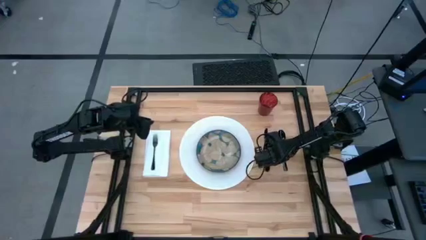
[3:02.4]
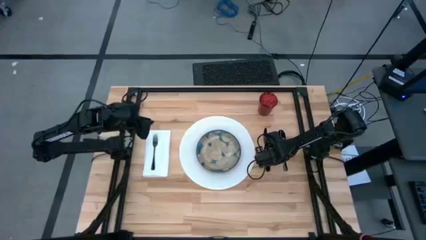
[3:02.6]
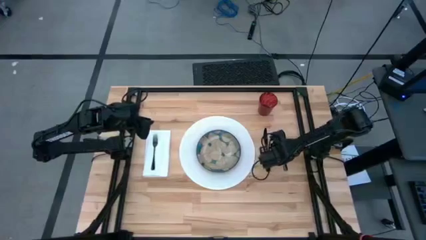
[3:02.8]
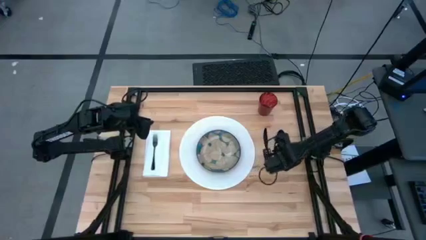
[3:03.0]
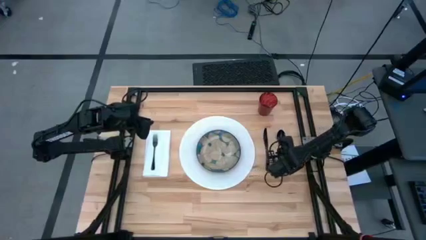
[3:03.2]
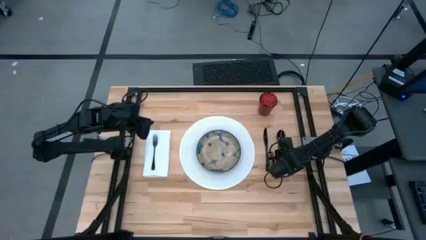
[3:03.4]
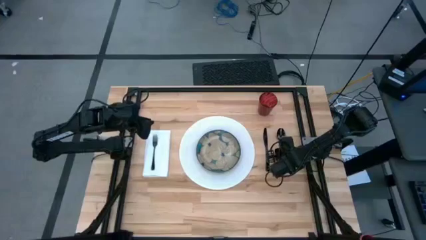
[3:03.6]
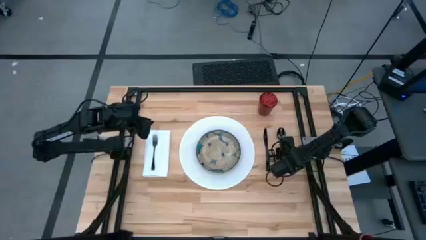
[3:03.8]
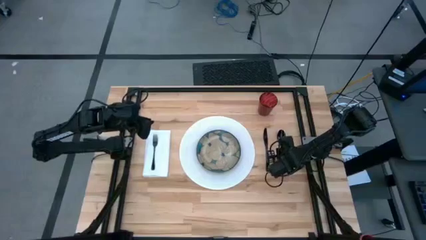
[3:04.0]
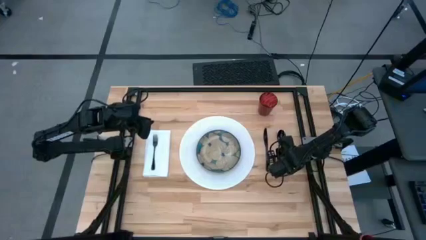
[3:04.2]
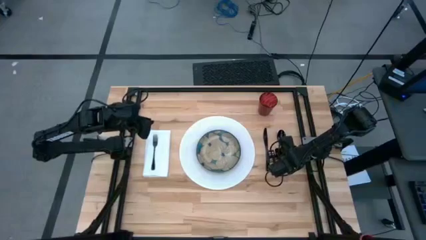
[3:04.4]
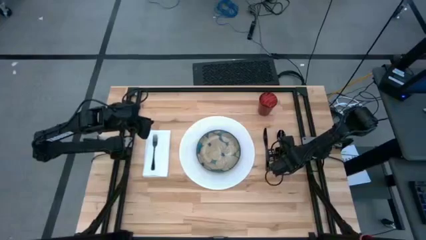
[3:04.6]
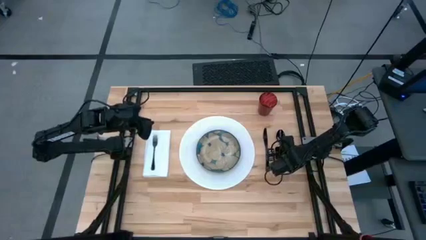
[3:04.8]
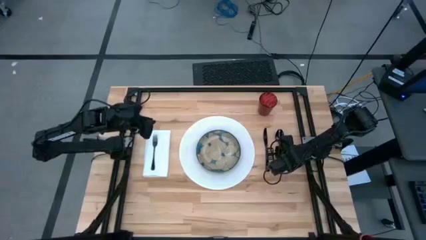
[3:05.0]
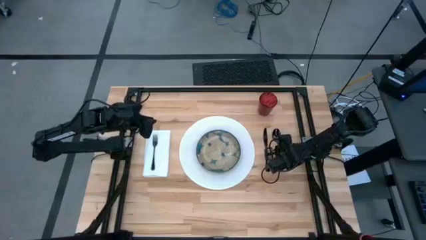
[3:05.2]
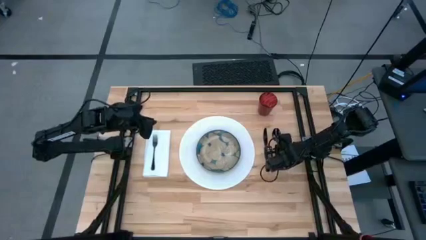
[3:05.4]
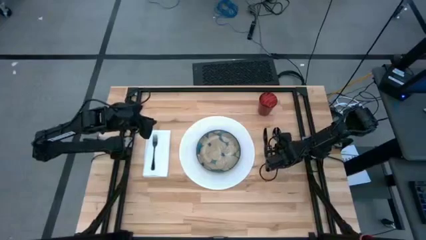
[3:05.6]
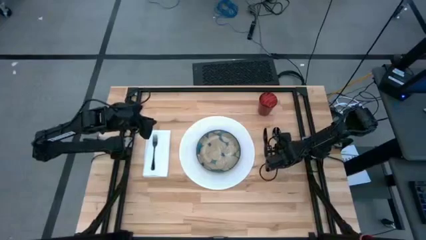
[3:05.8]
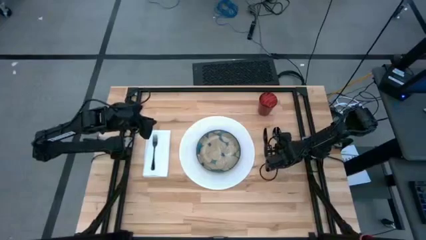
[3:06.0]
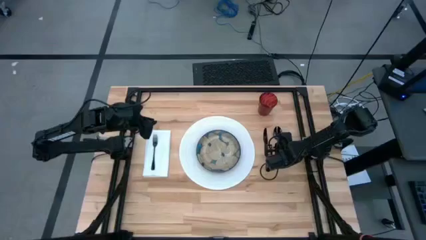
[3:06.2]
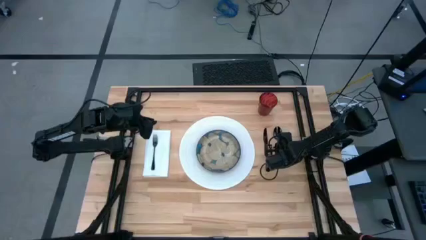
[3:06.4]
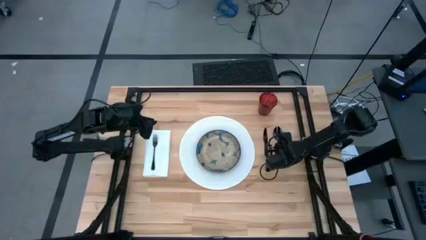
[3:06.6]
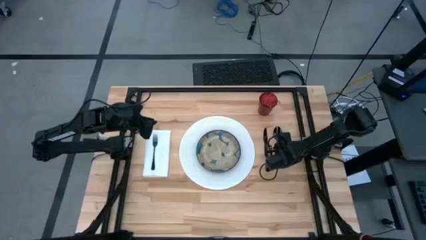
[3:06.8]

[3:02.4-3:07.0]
Task: Set table place
Adjust the spoon beside the table knife

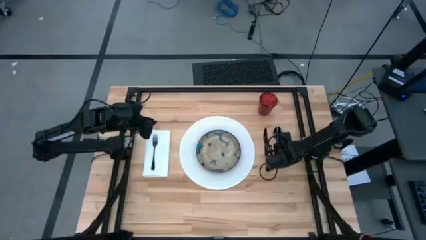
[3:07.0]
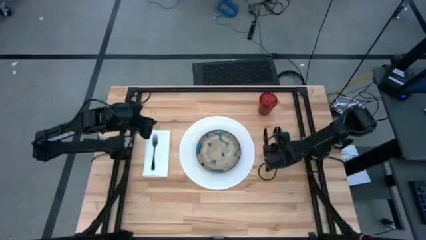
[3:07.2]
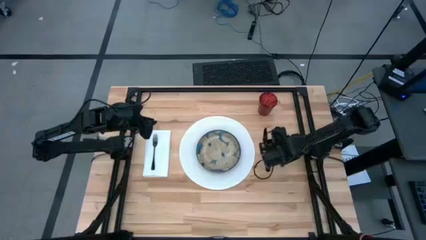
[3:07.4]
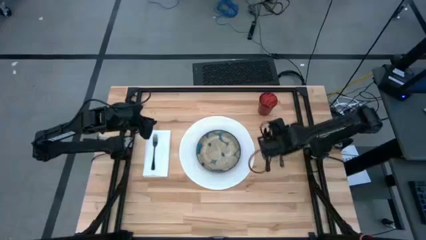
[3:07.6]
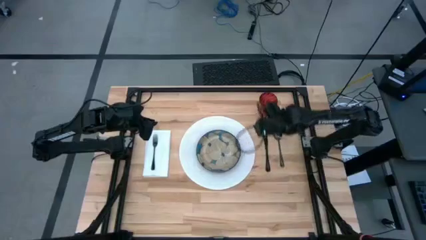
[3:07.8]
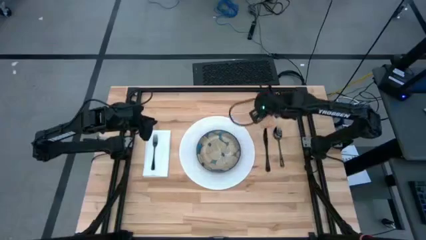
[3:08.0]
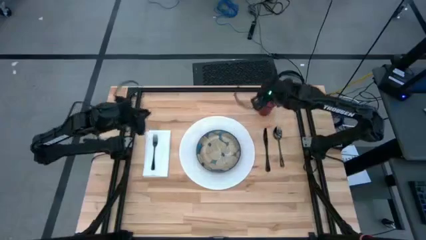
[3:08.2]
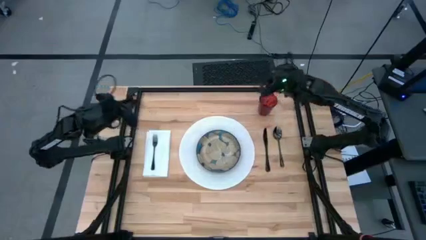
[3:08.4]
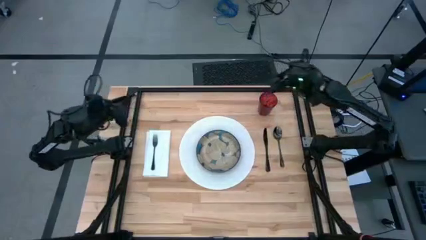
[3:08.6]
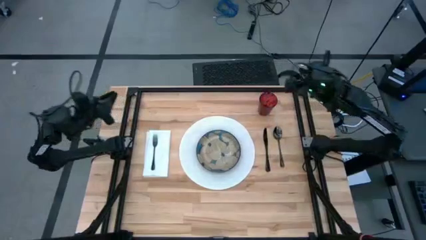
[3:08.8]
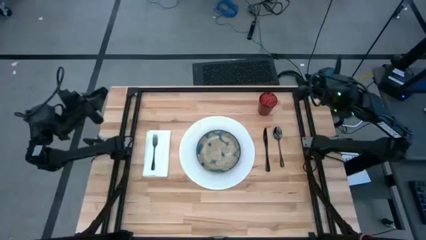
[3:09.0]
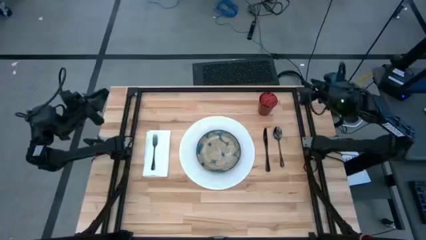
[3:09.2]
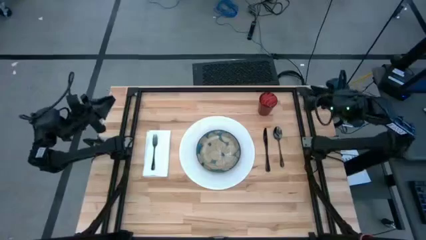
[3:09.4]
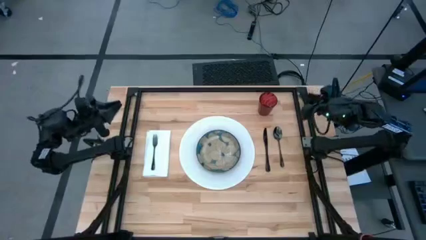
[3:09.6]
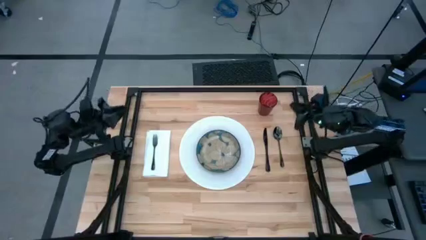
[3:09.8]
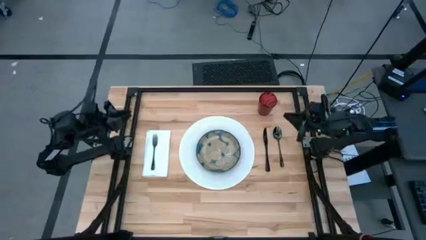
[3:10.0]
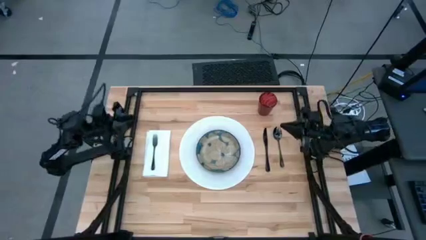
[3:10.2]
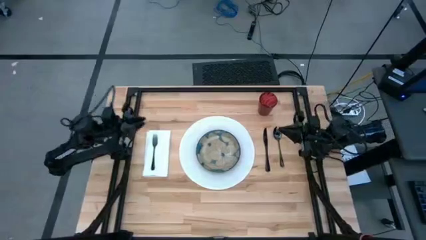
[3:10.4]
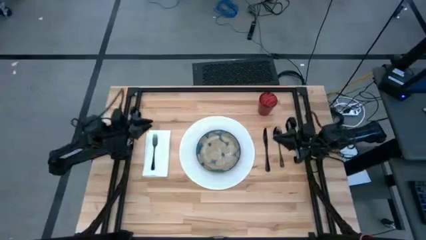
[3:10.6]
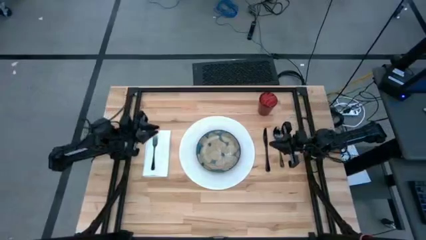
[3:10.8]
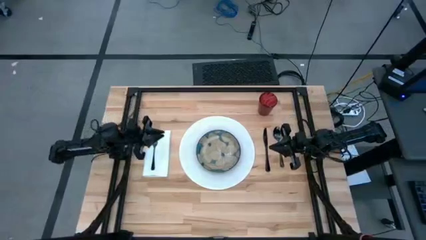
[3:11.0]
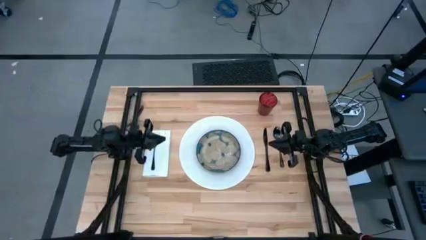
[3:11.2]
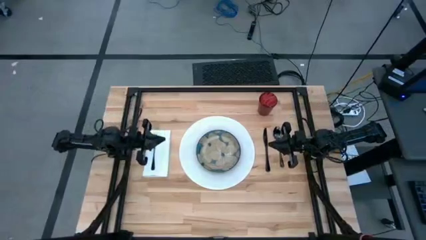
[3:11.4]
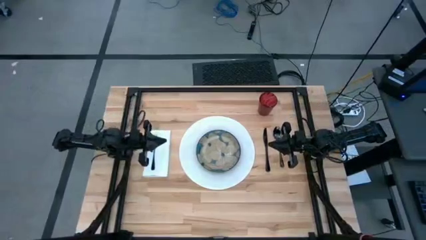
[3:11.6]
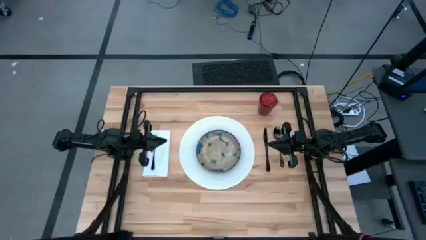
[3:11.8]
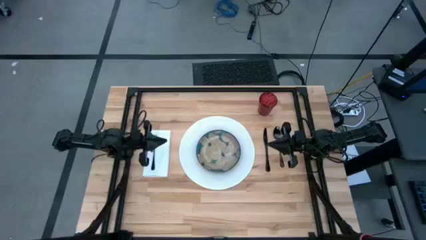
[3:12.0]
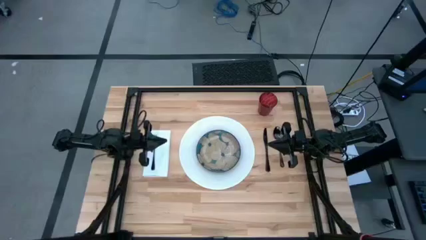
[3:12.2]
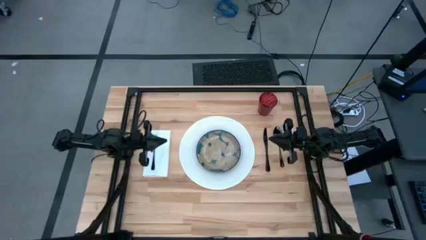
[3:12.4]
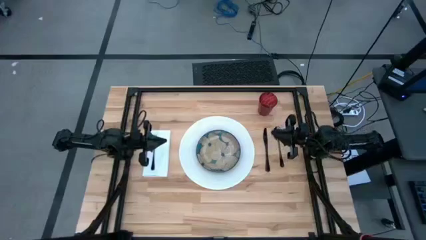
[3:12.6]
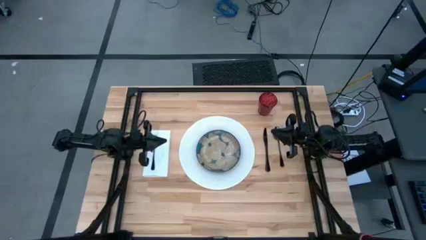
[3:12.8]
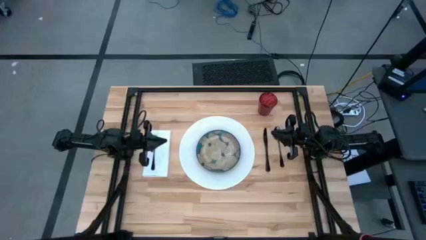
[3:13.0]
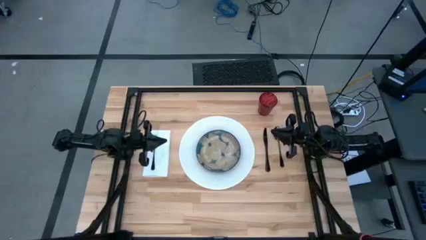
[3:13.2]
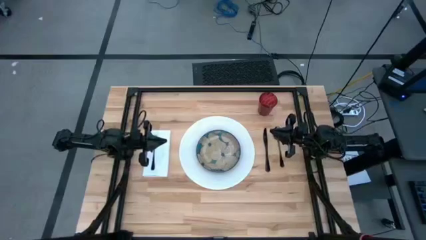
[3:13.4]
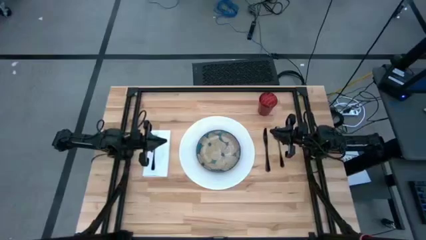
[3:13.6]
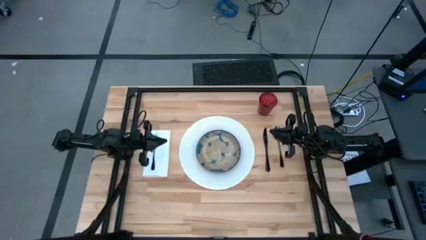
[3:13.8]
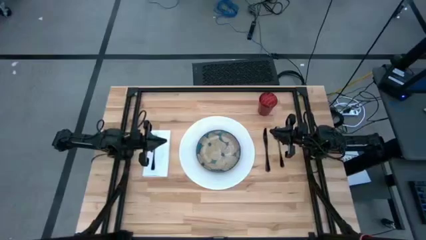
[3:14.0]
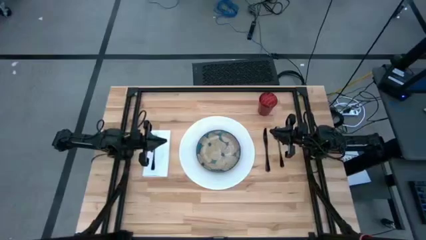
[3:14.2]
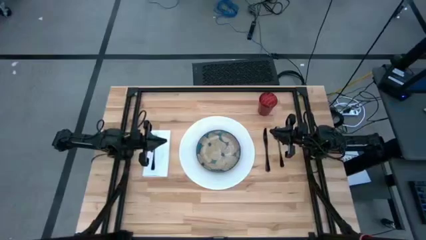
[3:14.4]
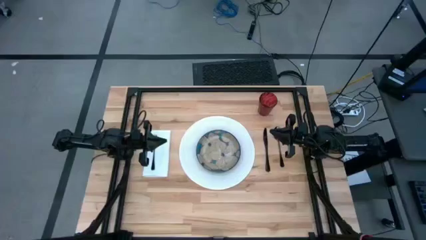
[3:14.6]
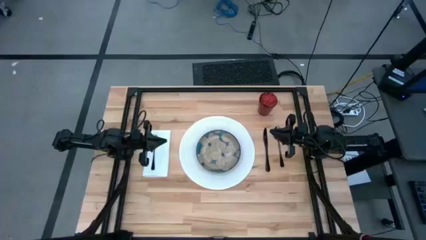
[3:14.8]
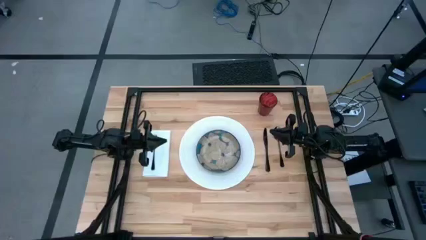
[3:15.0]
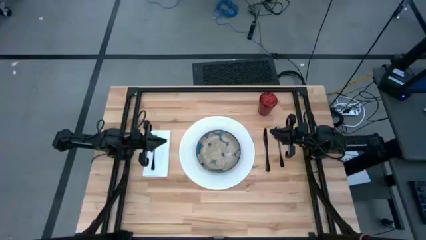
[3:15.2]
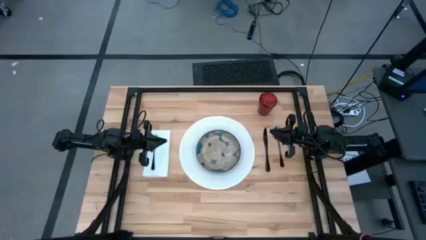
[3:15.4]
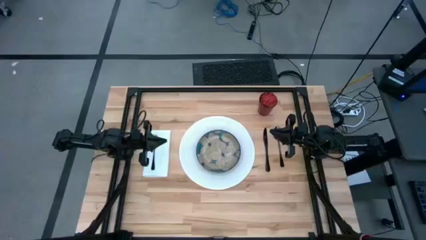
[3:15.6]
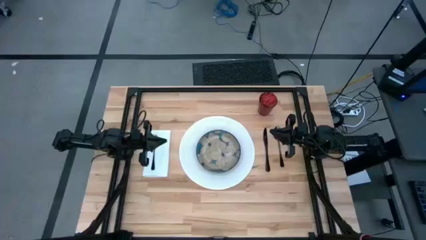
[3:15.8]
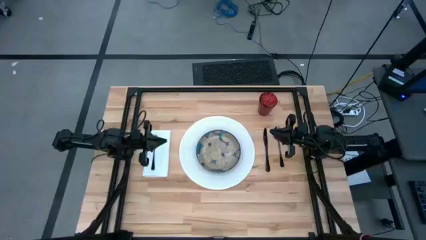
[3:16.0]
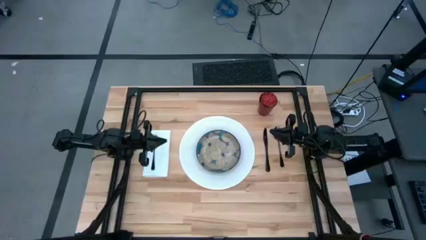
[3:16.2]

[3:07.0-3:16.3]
Return to Home Position

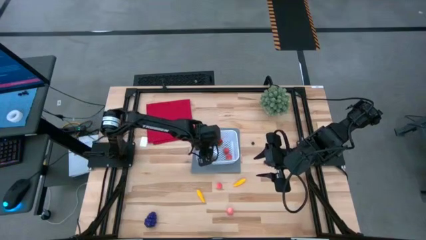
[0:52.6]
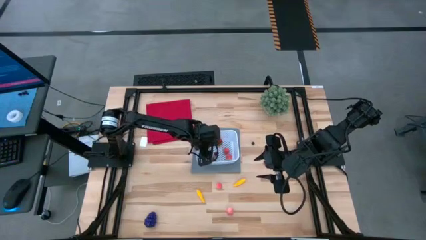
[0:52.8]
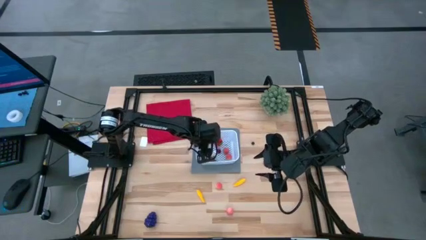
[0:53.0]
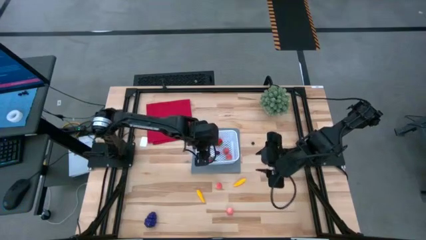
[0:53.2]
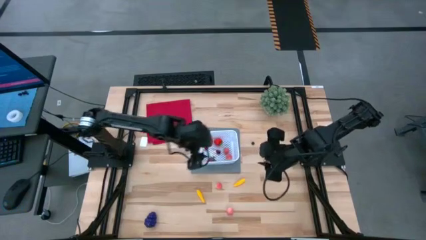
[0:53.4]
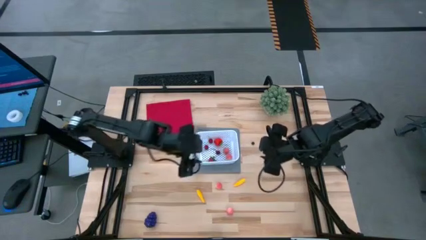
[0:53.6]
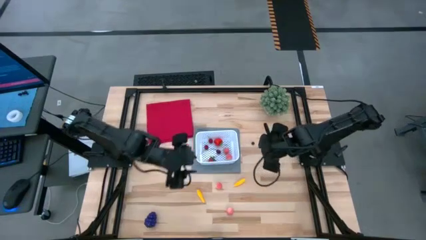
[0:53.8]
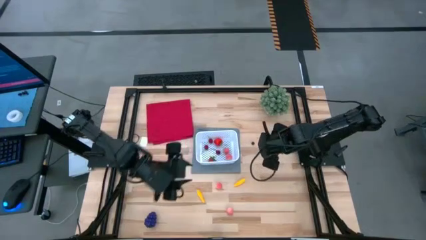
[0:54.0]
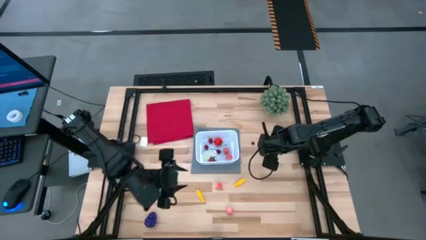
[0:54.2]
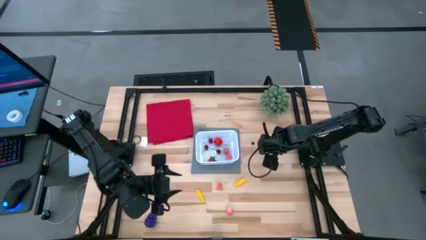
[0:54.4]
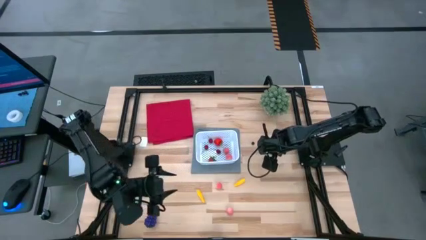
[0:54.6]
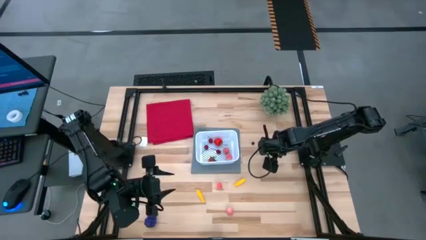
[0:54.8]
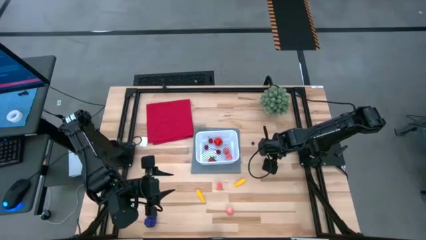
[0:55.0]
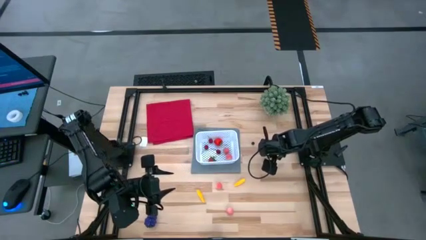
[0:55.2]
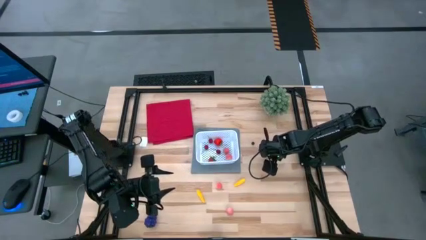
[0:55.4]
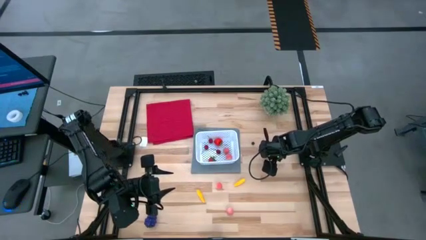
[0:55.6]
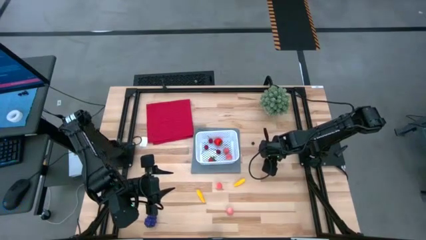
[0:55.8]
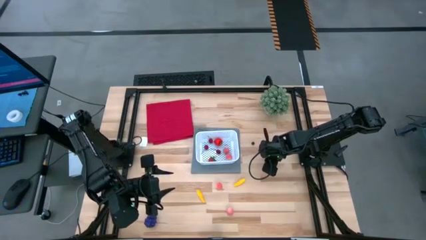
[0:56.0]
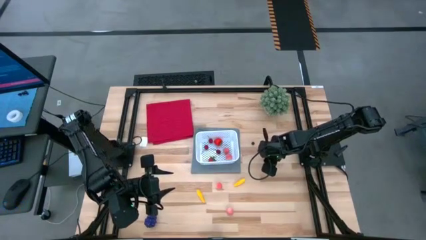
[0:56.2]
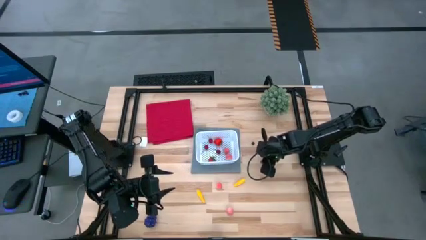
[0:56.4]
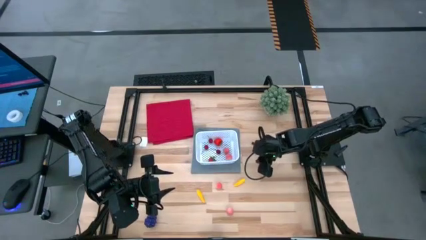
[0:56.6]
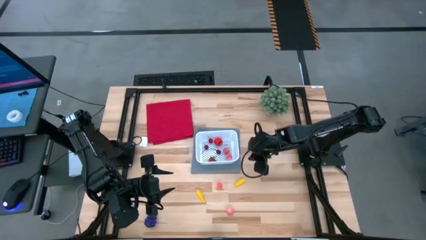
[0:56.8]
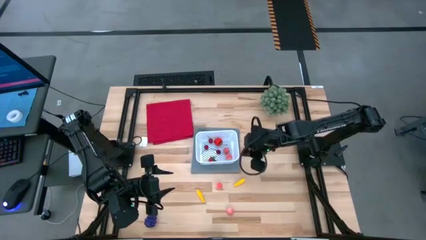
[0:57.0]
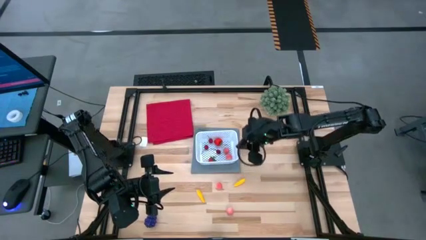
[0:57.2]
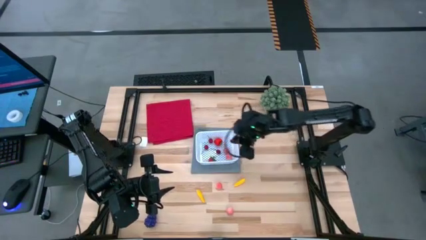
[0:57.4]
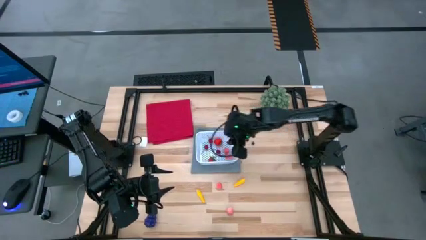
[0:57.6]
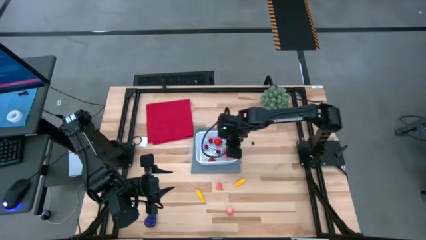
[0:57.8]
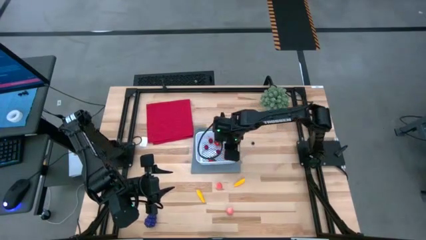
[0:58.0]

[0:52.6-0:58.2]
Task: Pick and placing Produce into tupperware
Put the cherry into the white basket
